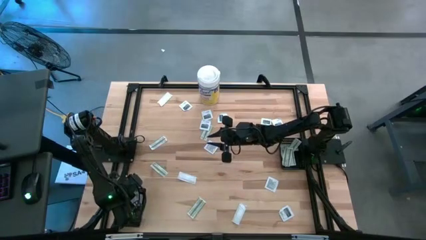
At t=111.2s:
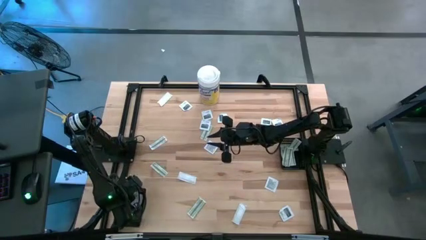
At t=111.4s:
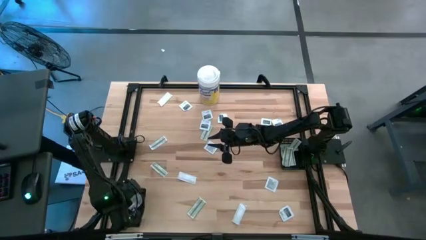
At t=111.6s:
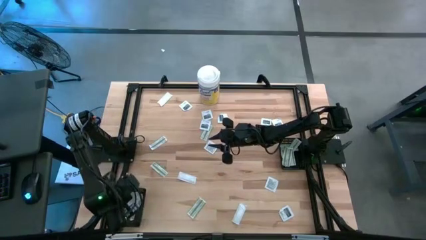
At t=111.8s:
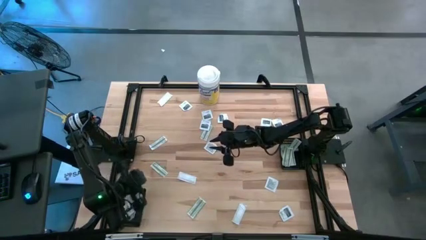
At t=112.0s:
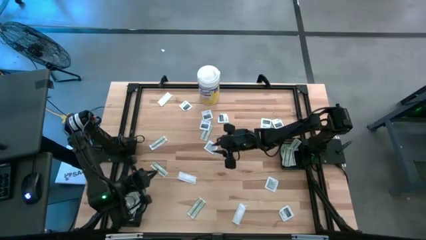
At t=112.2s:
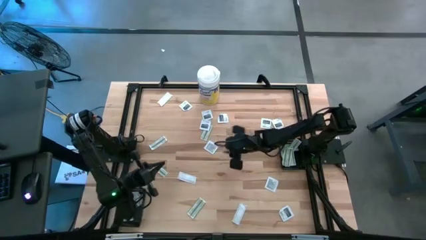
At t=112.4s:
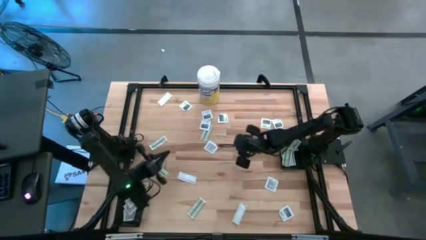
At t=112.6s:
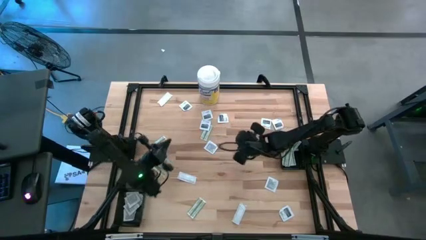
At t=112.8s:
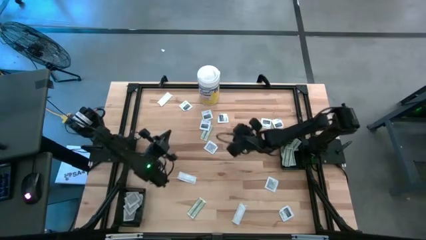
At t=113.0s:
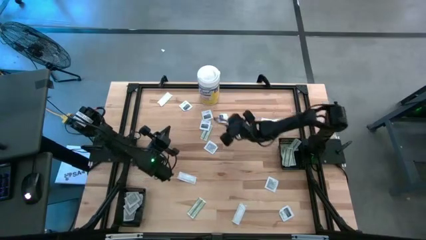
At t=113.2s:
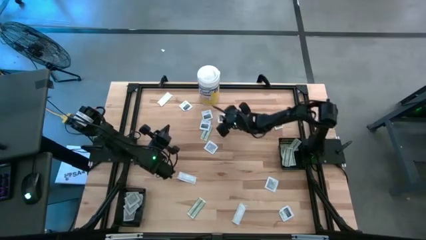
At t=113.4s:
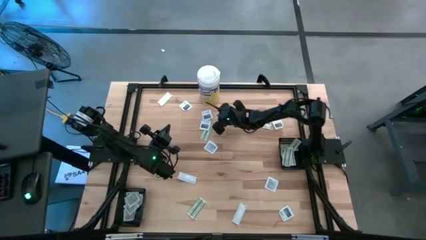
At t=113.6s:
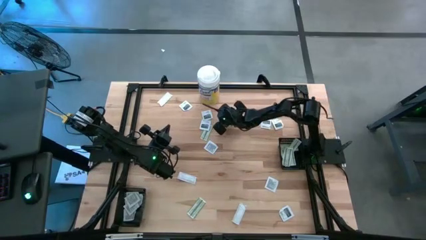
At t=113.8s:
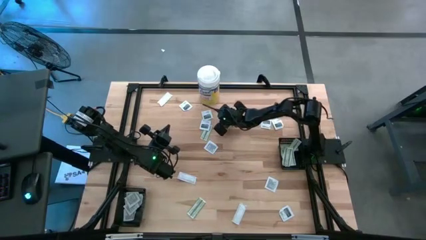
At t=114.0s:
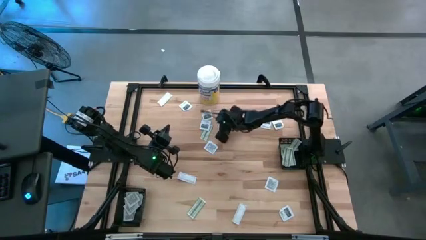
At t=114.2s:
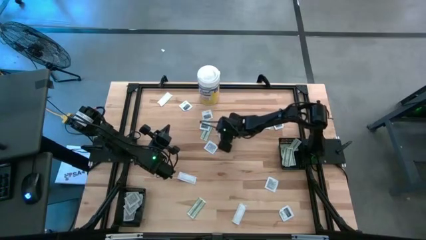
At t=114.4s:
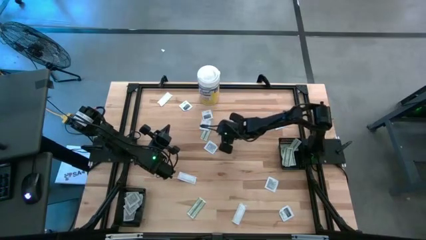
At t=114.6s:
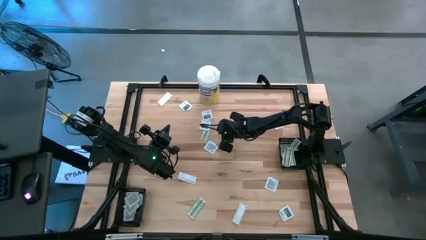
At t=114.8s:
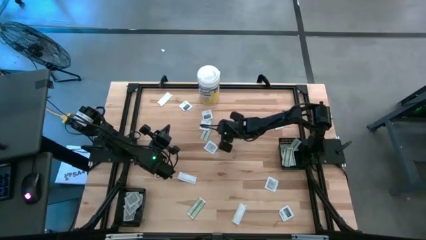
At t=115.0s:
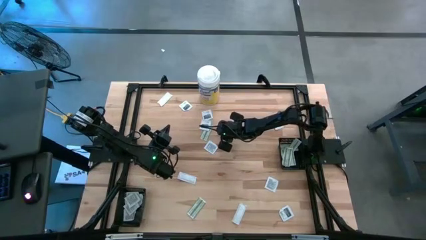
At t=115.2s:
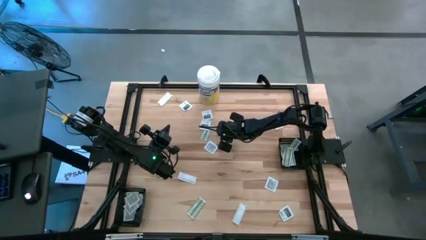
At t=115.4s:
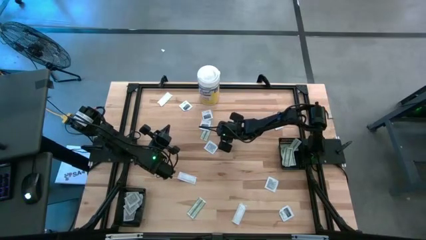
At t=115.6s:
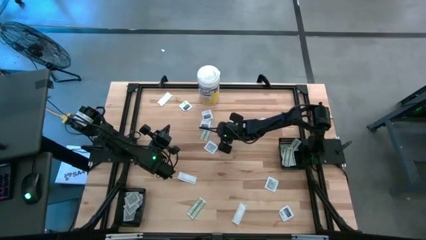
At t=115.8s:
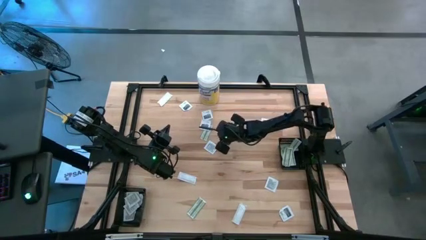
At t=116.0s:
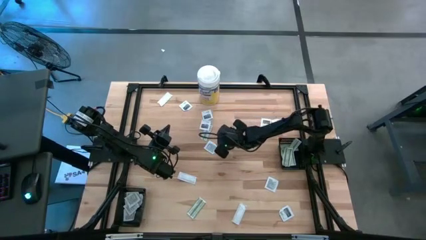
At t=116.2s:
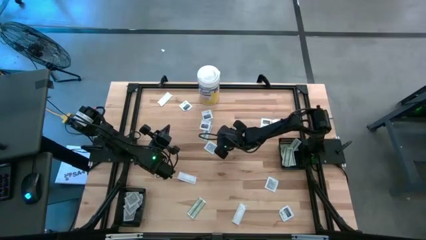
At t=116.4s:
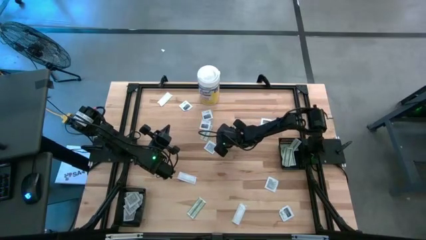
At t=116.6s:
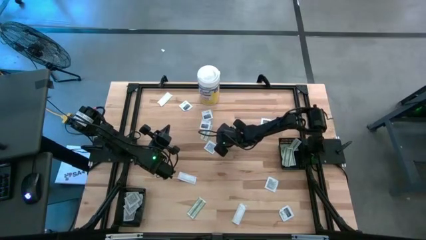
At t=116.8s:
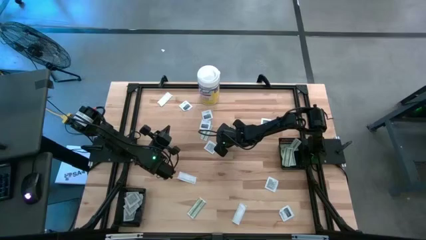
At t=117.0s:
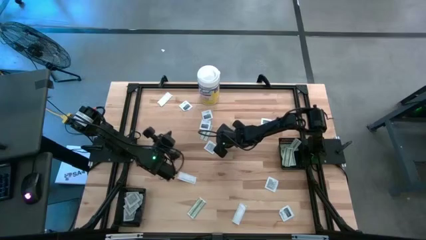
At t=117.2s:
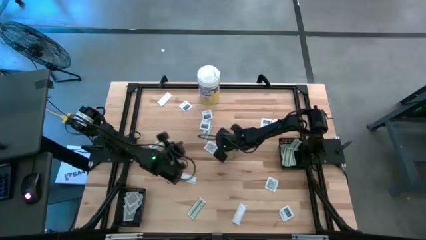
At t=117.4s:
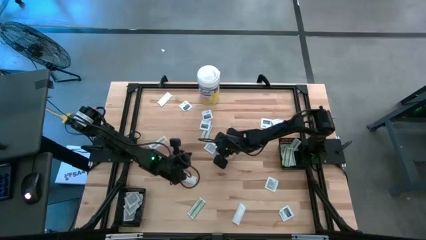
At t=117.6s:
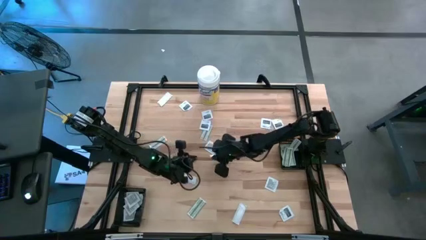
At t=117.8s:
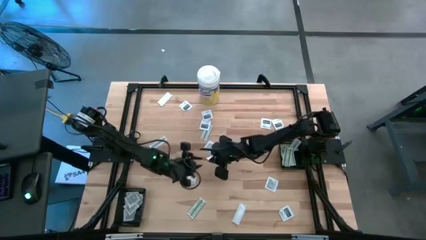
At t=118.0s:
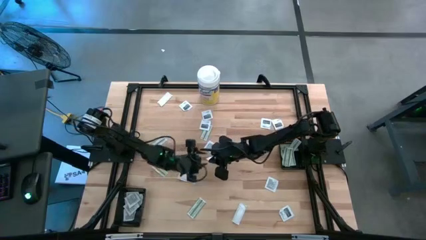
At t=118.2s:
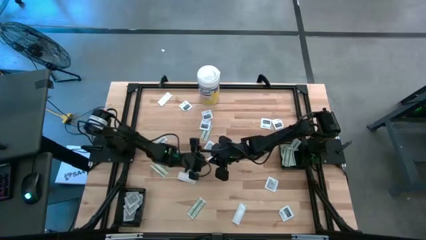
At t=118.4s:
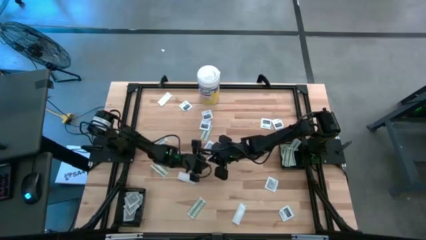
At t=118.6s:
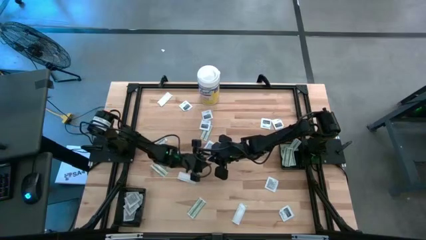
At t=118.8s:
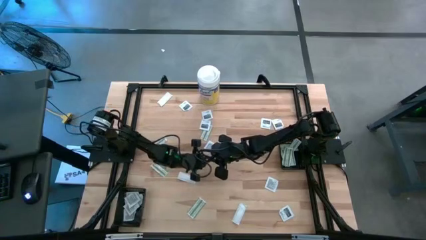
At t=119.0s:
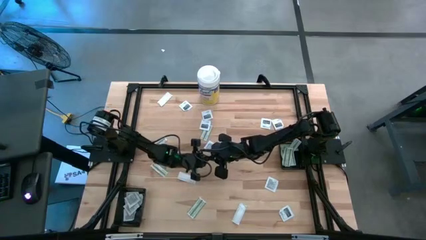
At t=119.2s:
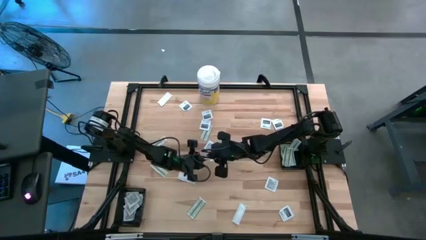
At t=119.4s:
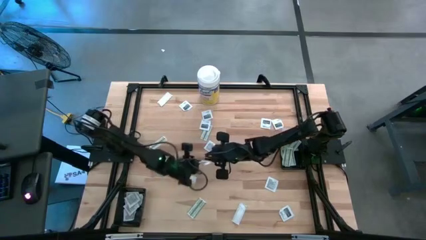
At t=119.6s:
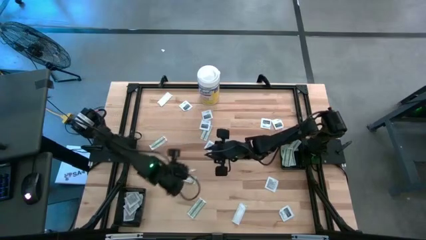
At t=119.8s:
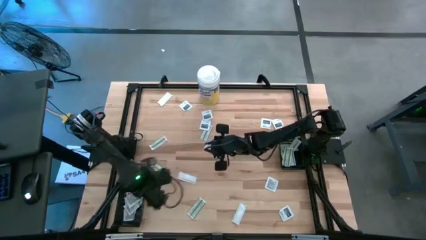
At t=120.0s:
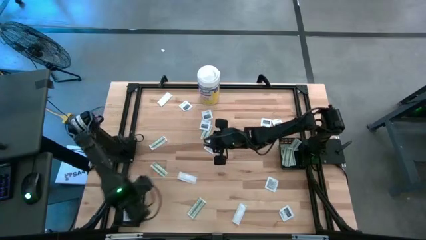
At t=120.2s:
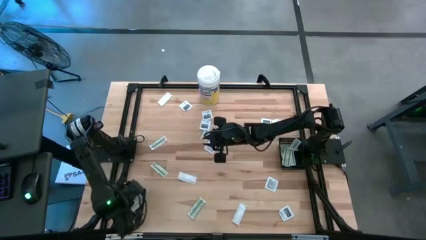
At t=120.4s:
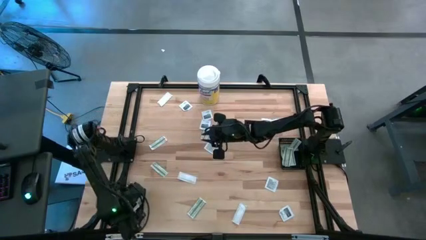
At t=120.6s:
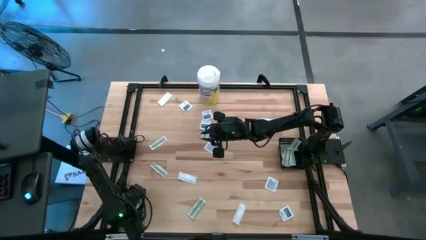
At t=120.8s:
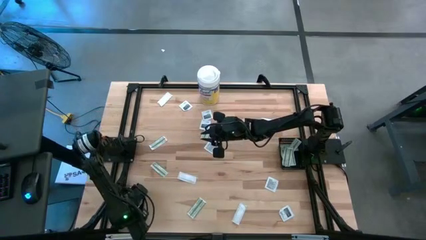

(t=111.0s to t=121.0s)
Task: Pick & Place First Aid Supplies
Put the white towelette sachet into the left black bin
